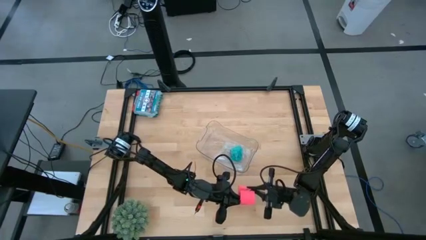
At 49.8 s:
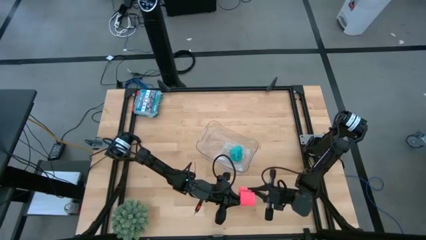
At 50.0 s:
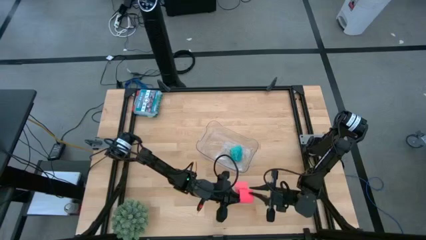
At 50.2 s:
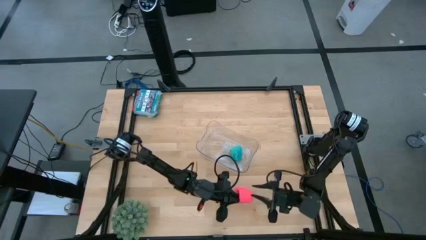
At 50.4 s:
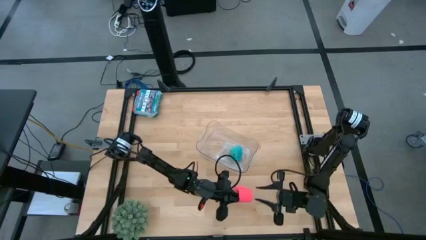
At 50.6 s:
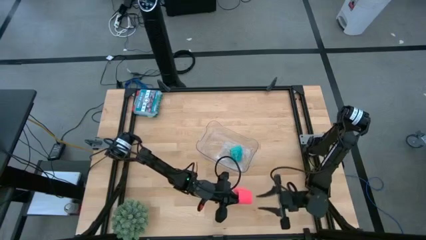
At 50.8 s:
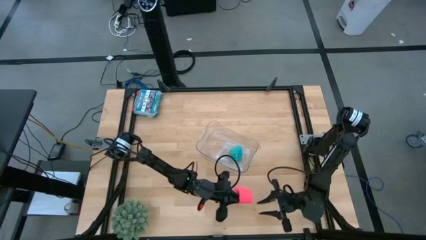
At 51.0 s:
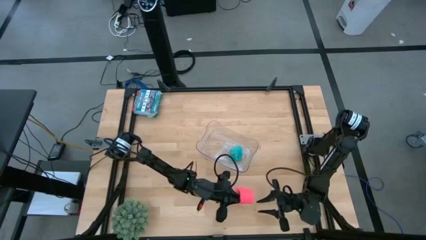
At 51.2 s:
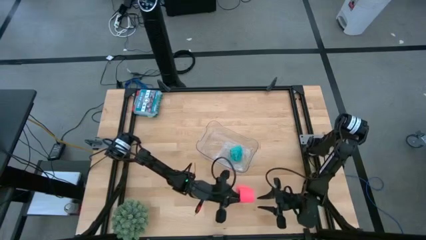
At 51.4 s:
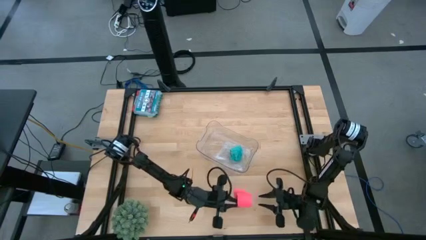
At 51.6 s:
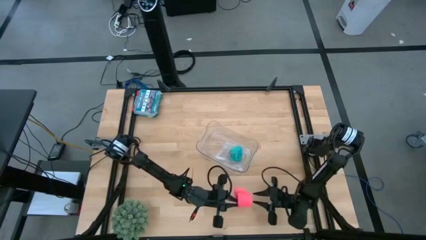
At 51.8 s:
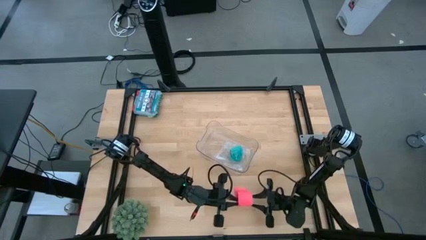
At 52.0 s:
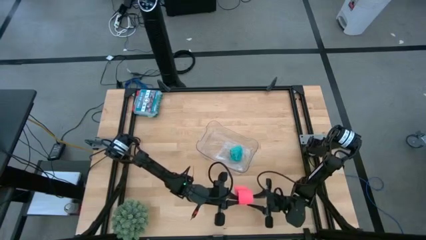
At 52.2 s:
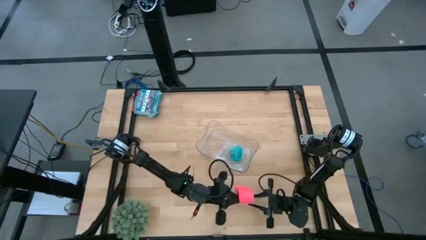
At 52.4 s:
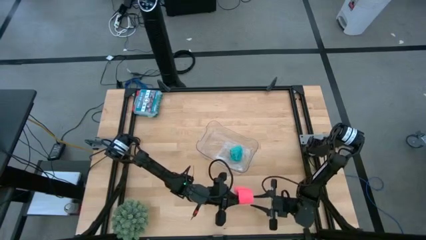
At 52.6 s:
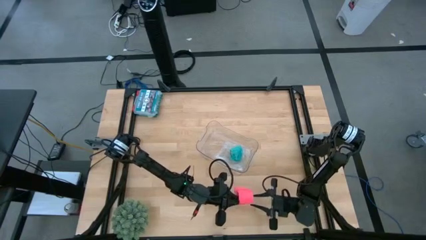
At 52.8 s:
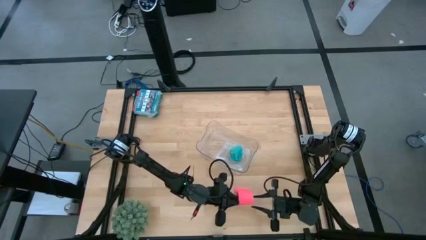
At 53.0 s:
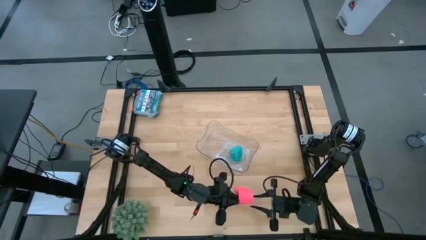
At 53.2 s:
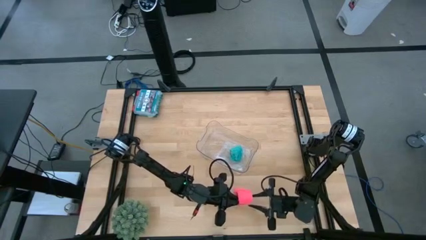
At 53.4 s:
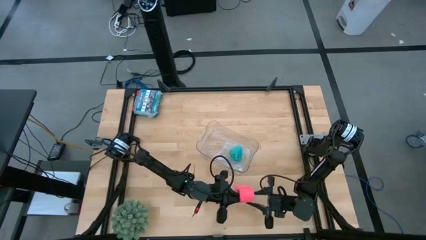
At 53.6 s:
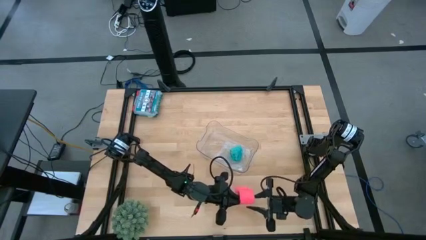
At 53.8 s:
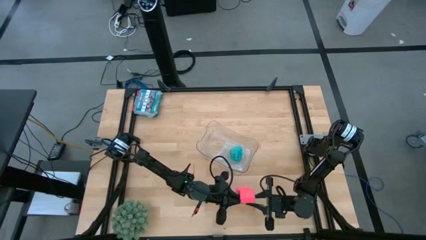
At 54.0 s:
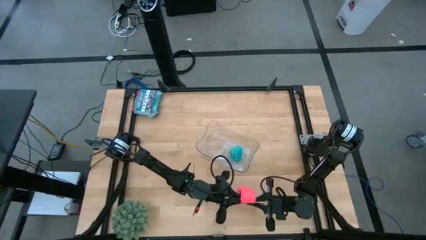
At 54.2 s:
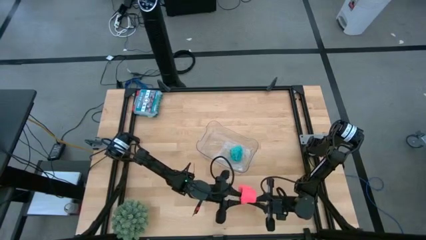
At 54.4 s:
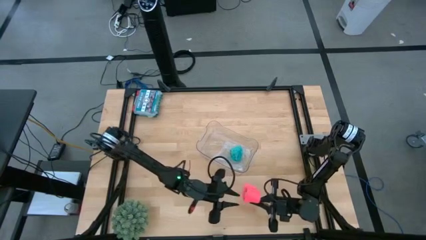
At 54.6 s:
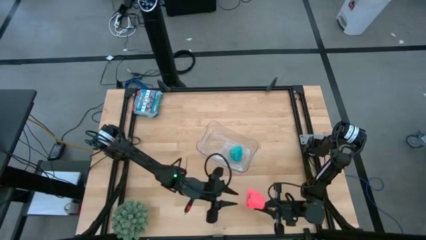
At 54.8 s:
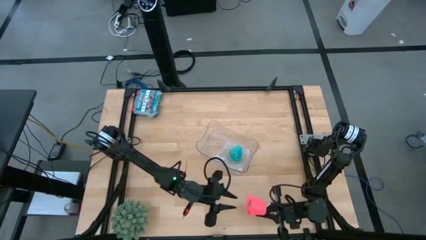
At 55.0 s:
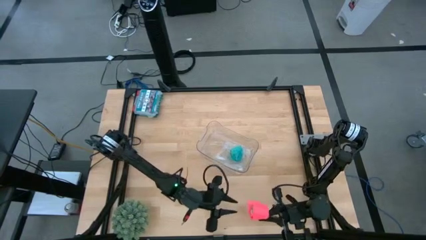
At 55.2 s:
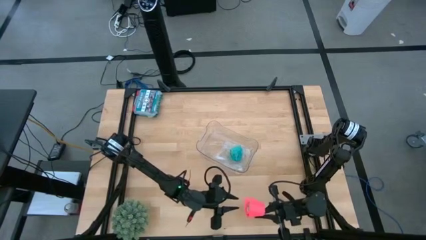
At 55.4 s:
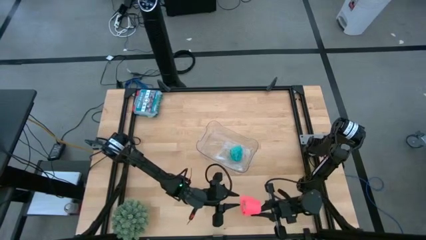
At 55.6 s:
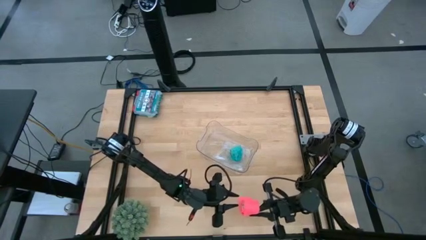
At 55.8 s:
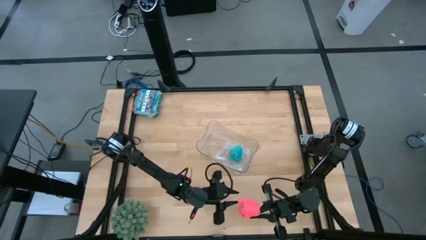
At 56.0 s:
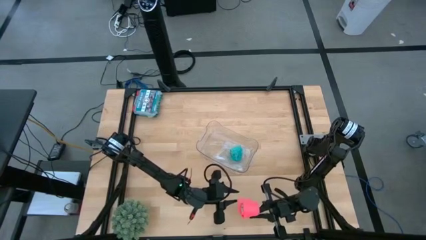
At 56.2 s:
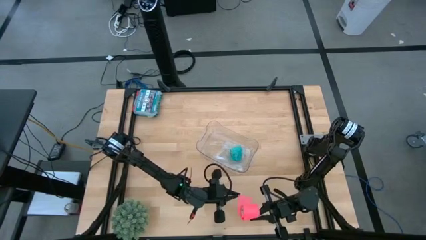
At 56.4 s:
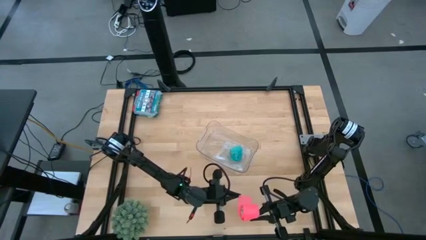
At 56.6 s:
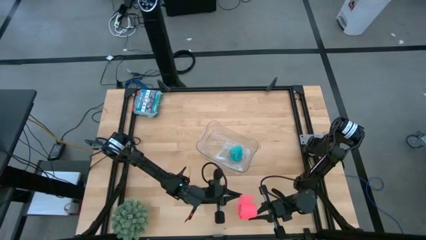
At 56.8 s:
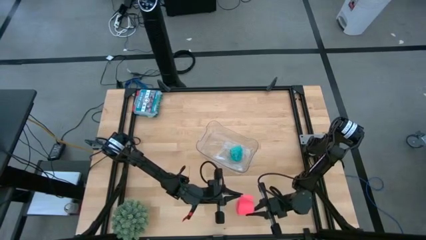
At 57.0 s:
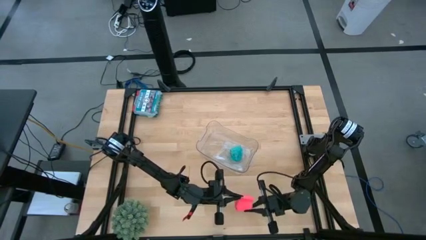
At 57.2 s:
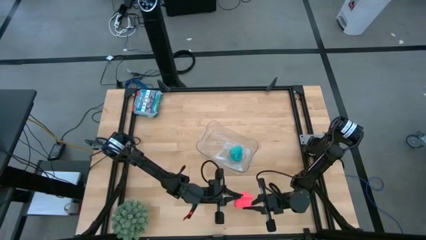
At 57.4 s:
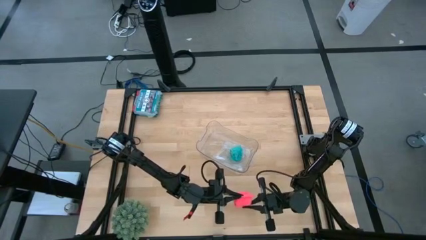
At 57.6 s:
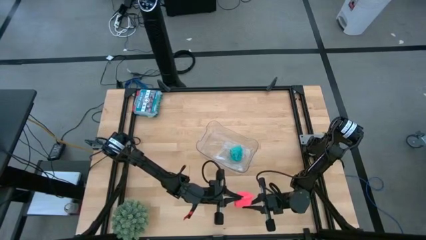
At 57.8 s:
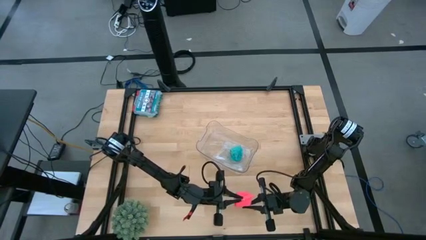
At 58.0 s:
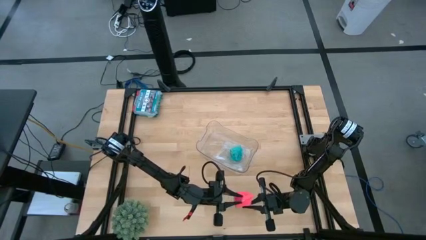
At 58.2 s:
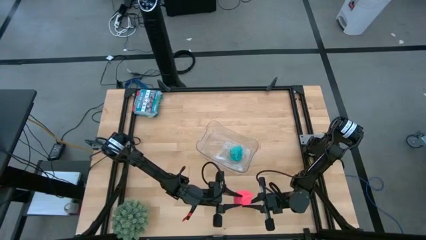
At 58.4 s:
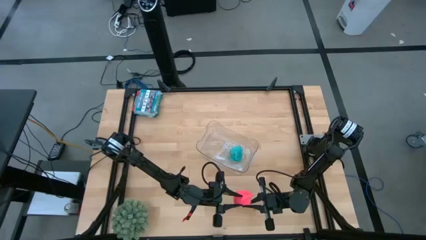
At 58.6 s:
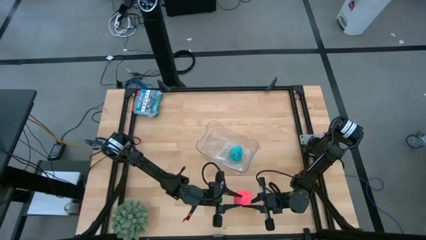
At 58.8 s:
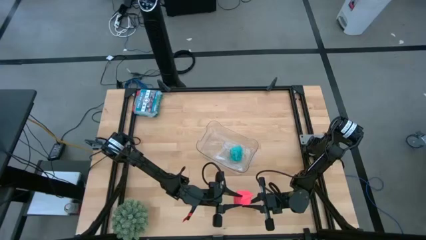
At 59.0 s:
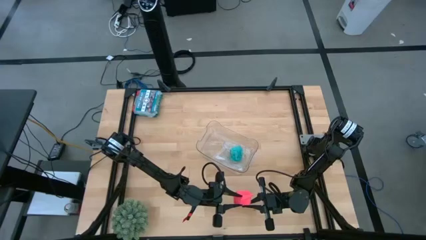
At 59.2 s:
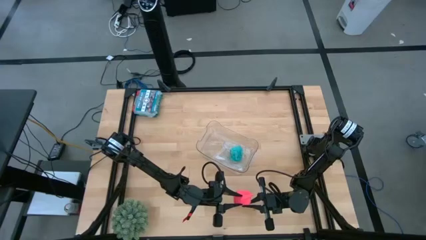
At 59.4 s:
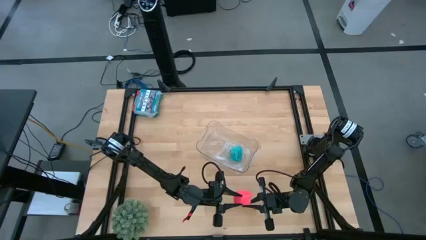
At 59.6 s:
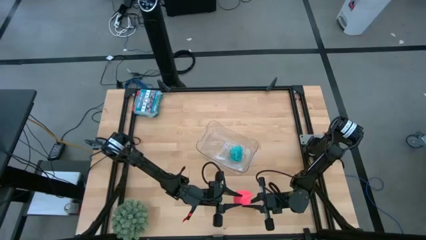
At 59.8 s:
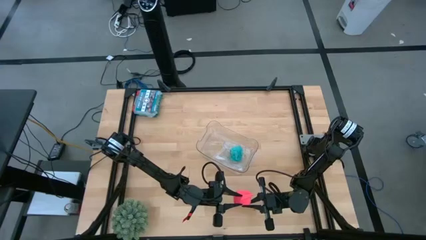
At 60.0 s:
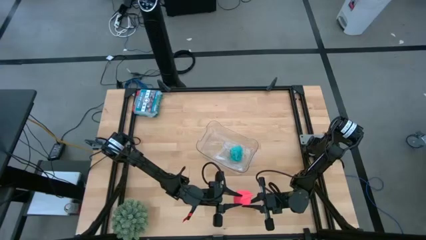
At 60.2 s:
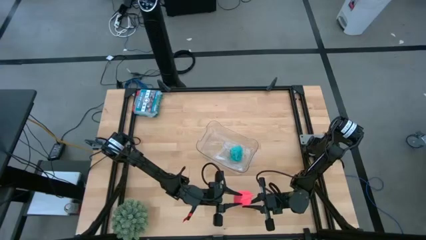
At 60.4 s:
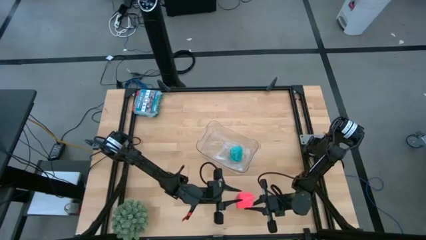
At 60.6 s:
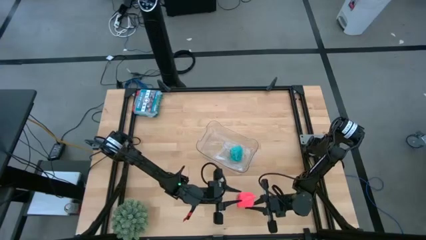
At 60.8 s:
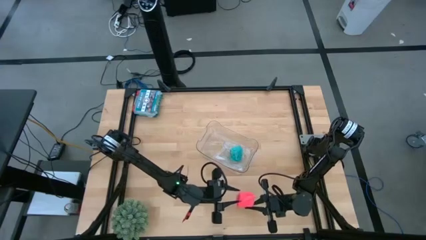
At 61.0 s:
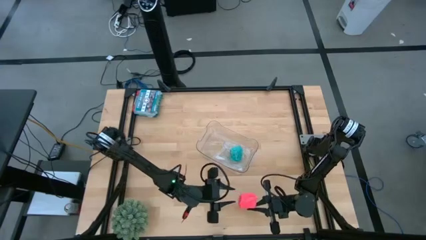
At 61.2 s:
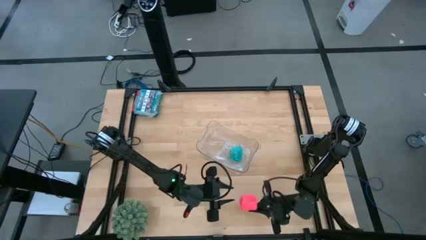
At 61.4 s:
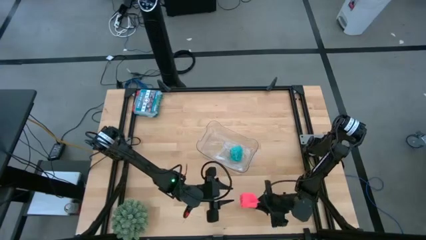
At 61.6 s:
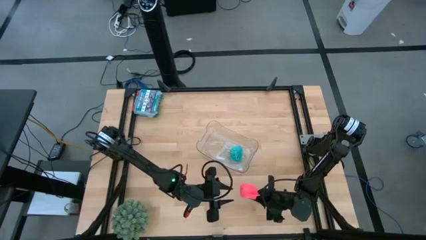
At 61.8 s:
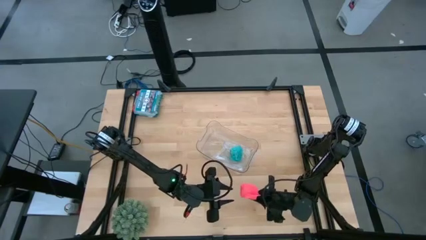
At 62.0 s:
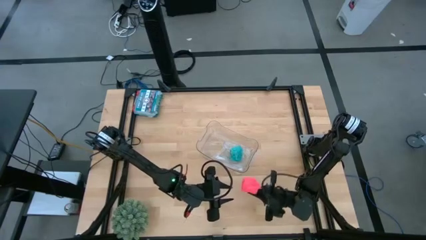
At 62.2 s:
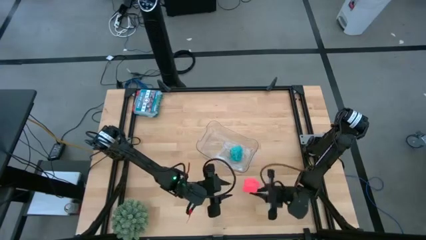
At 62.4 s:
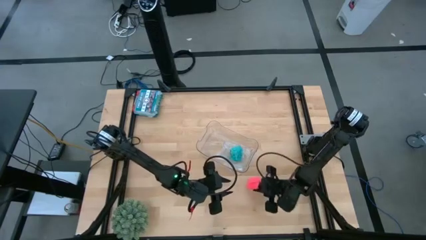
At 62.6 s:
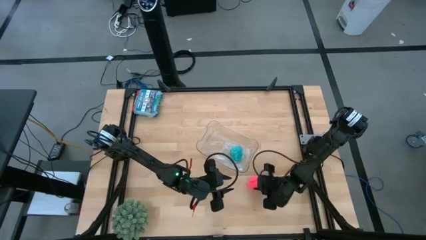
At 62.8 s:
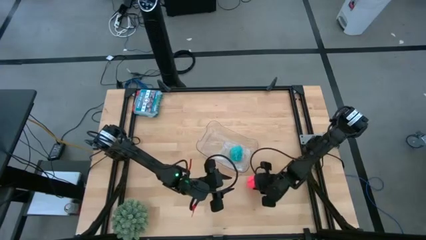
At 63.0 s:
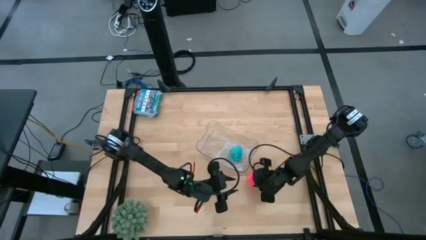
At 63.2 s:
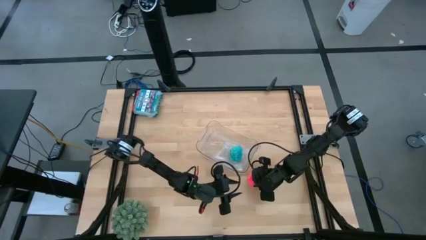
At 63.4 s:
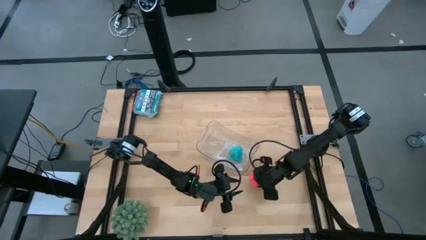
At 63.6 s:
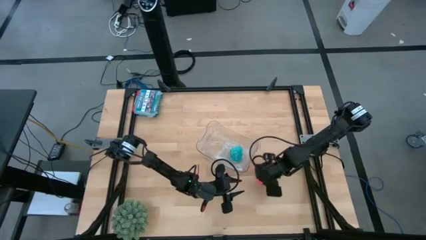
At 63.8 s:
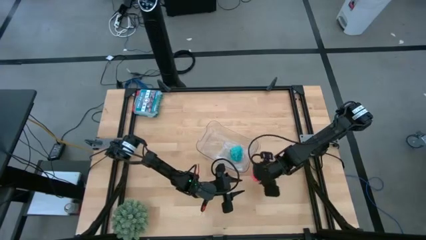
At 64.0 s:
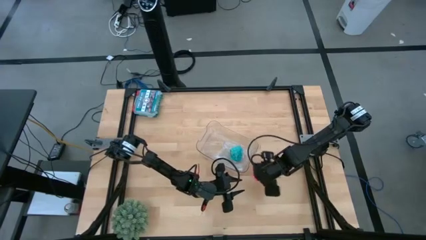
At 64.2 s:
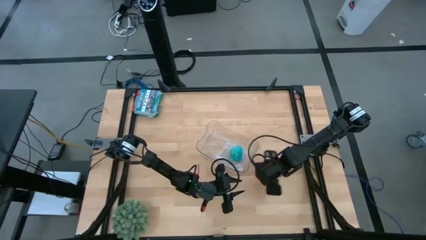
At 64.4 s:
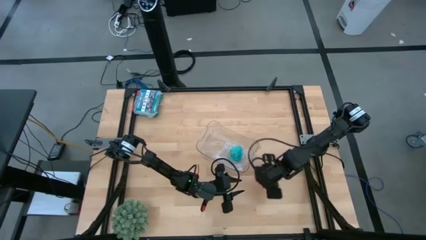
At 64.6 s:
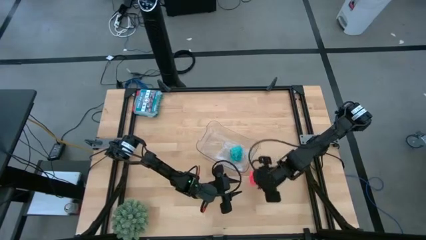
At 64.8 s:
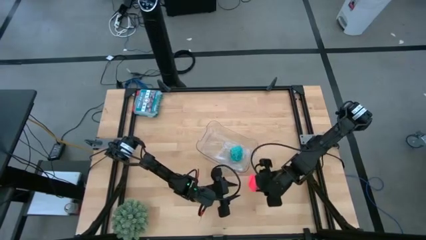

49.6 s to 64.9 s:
Task: Roll bandage
Roll the pink bandage
